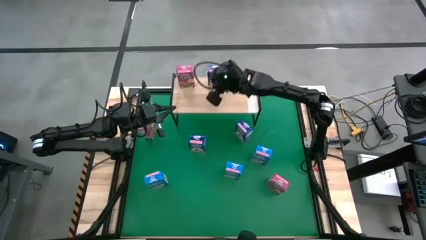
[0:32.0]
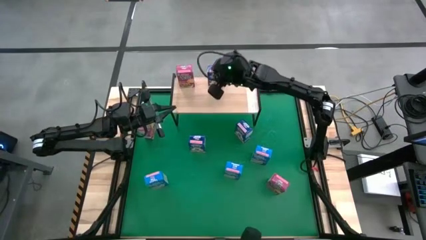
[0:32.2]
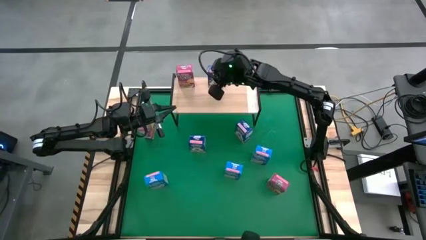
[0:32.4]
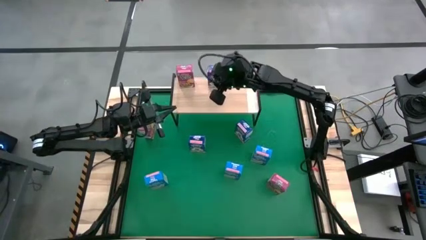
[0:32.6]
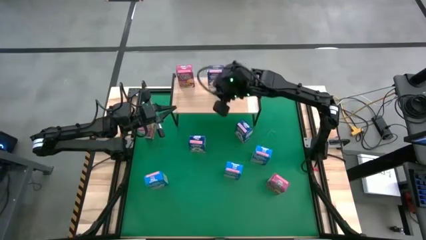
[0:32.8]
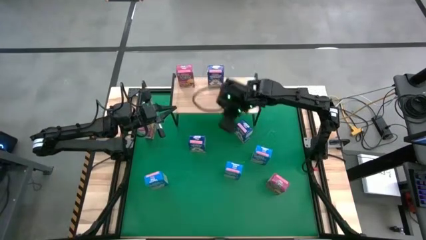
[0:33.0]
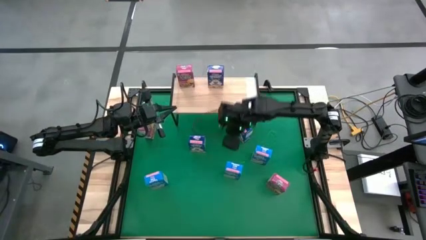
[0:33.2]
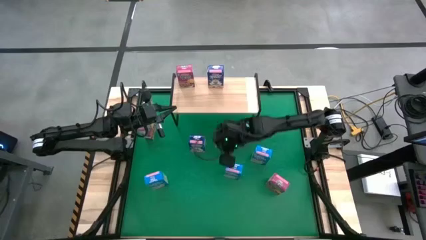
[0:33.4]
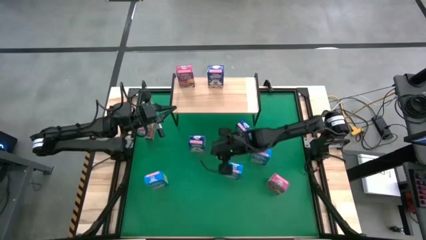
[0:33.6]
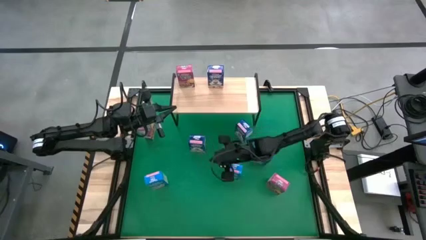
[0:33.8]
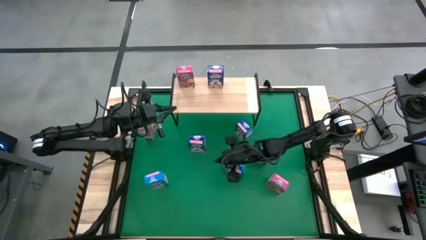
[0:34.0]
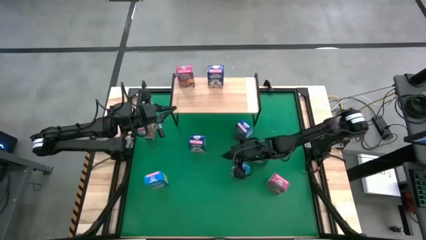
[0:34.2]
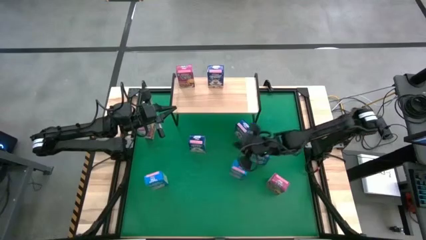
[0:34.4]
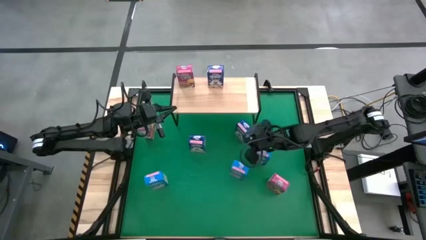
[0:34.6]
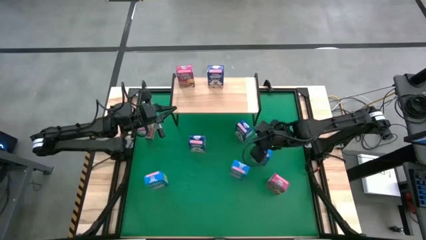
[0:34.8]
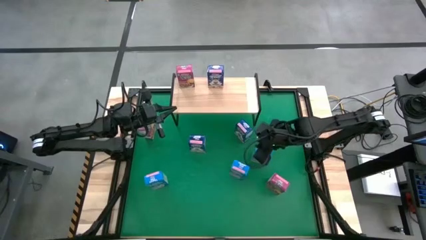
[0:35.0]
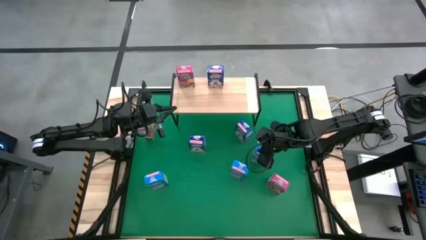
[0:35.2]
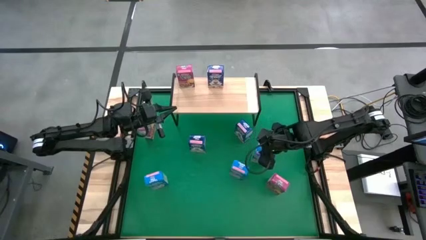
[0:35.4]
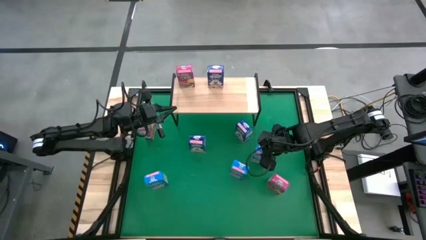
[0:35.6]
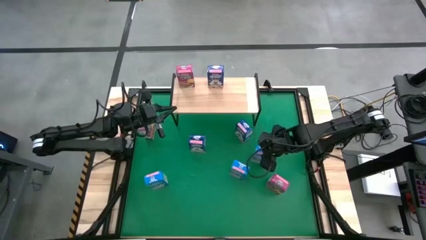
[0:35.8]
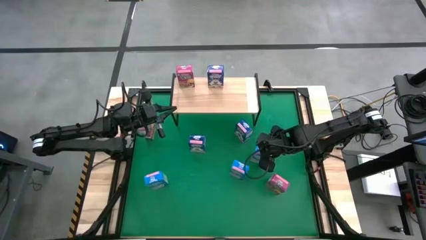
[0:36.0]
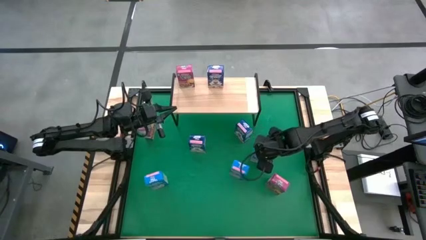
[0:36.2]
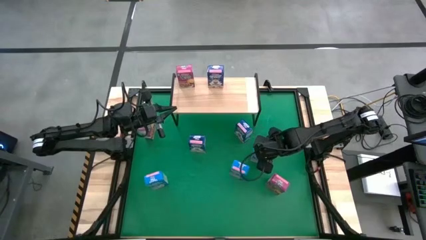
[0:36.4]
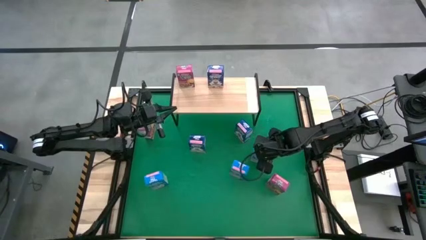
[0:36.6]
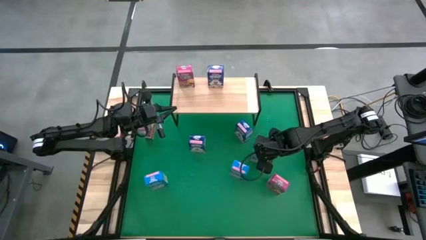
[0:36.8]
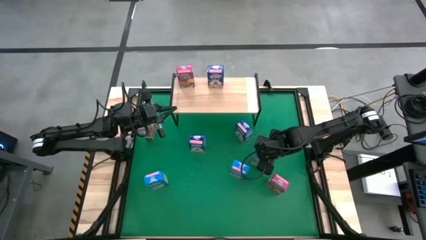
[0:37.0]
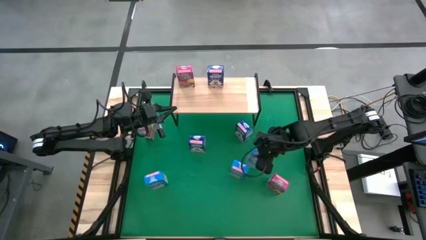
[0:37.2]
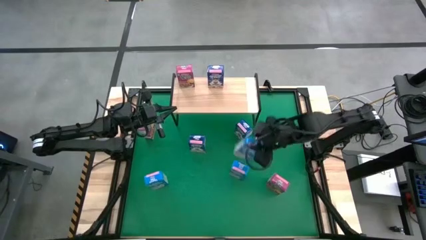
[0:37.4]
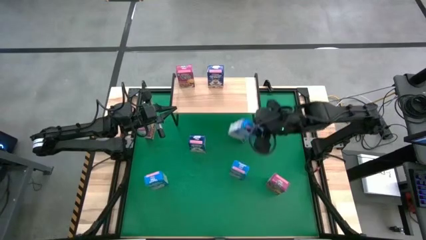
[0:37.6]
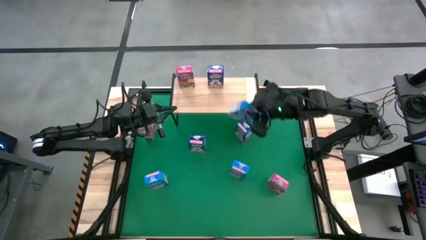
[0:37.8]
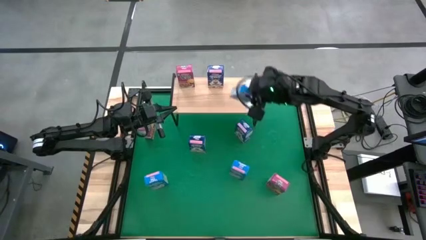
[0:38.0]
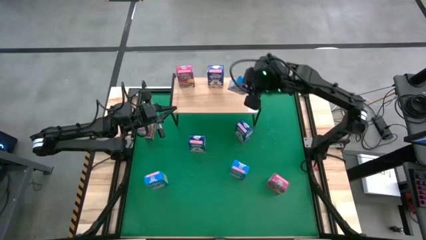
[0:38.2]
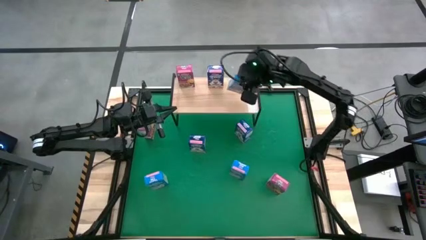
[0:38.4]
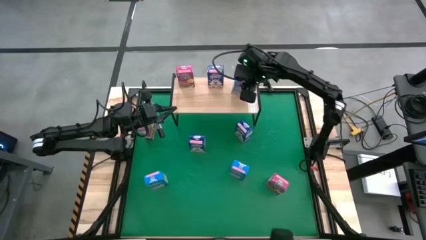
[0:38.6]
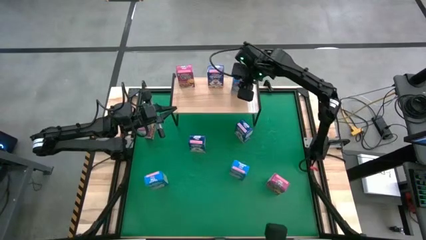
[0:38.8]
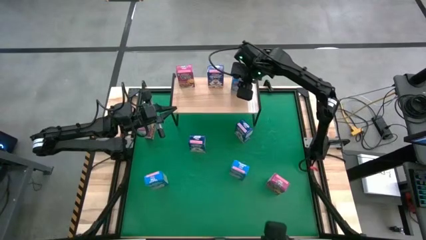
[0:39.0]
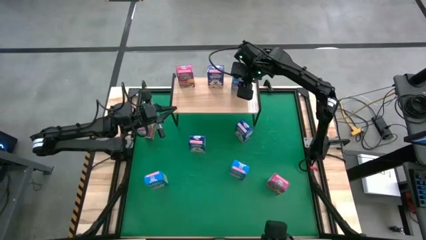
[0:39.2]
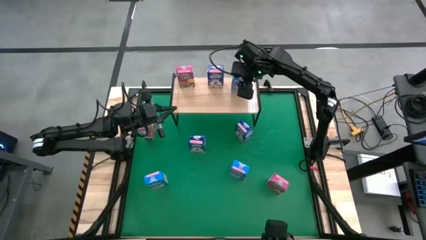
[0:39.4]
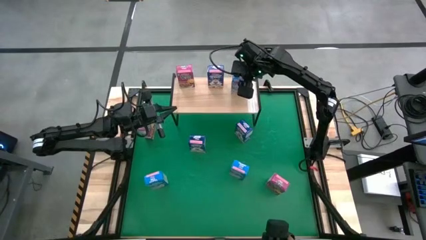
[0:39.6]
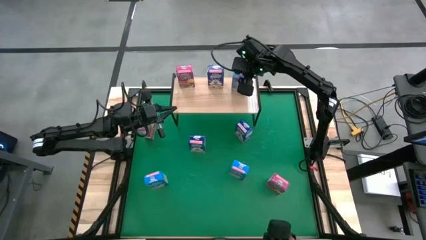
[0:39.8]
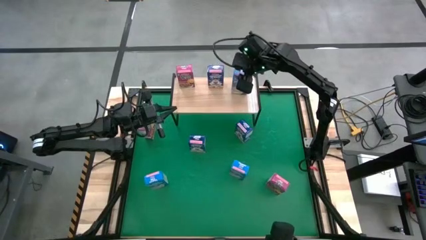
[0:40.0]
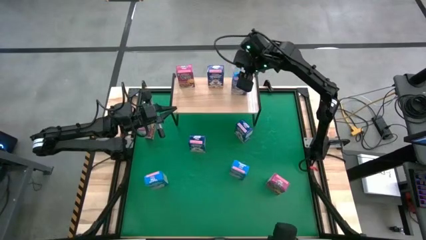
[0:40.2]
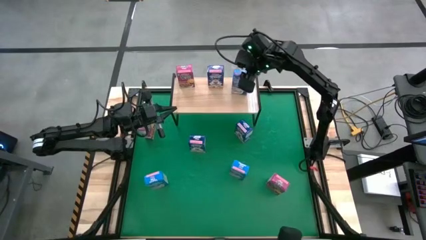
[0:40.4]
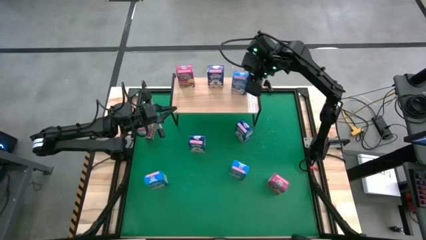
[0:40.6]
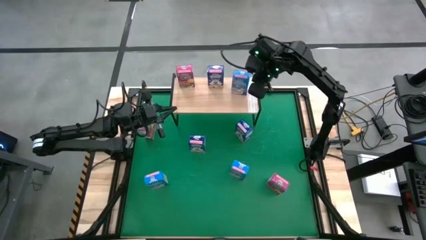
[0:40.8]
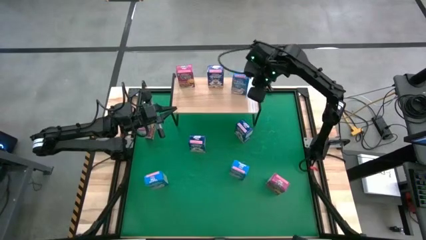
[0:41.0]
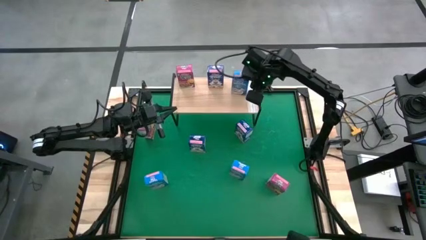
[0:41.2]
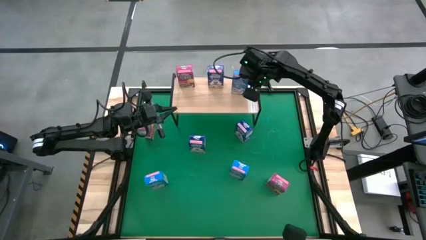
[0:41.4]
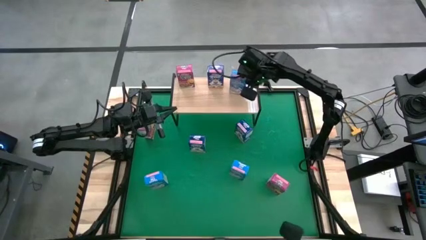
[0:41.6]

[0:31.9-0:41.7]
Task: Stack cereal on shelf
Put the top light blue cereal box on the shelf

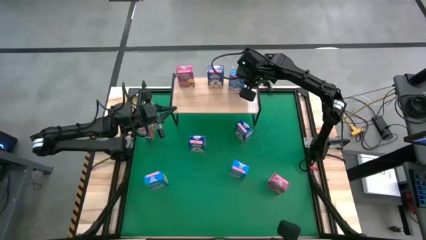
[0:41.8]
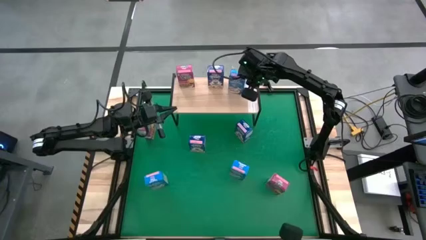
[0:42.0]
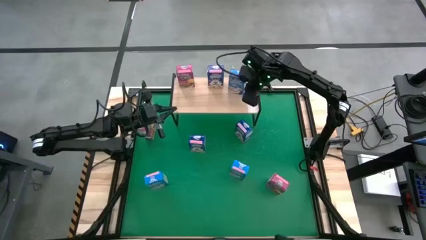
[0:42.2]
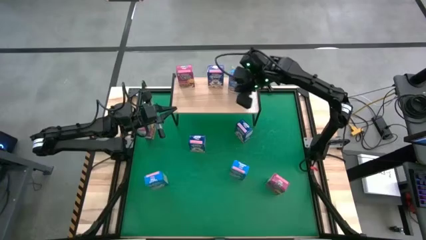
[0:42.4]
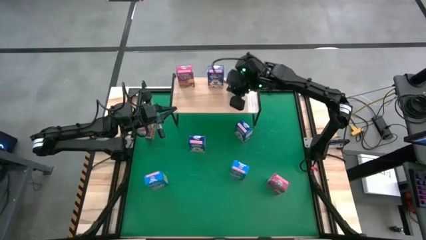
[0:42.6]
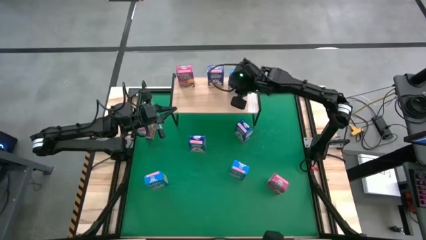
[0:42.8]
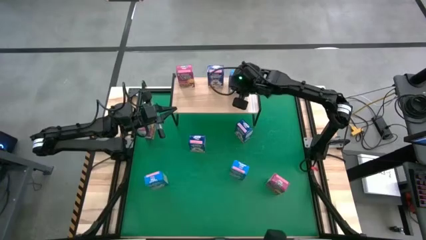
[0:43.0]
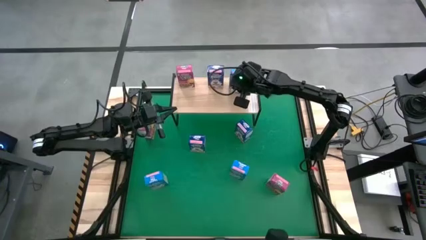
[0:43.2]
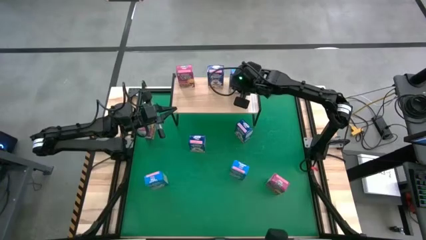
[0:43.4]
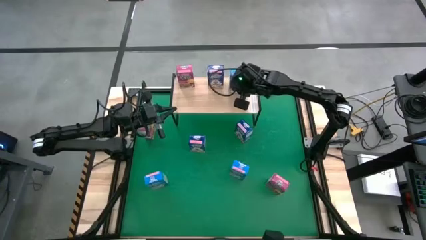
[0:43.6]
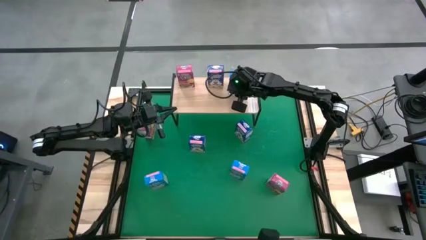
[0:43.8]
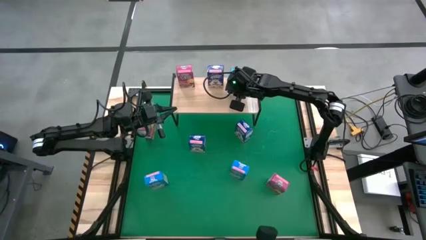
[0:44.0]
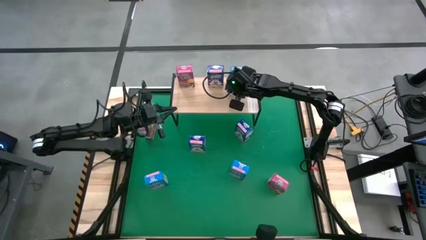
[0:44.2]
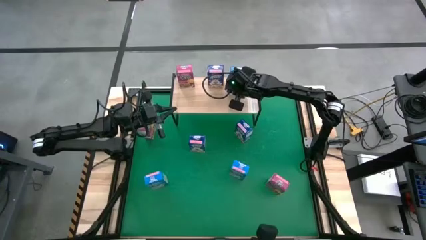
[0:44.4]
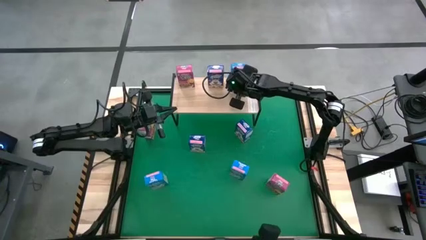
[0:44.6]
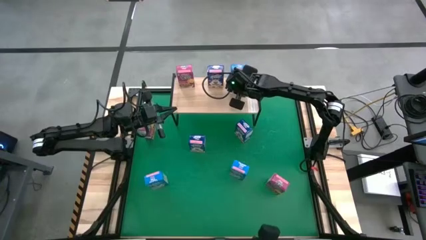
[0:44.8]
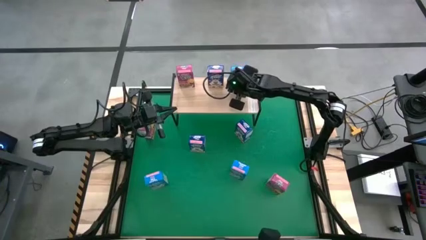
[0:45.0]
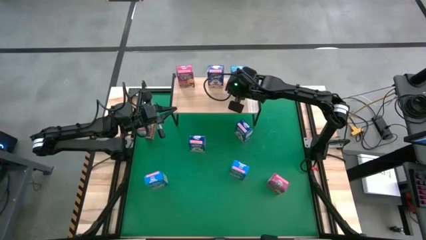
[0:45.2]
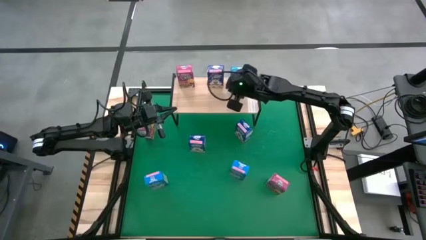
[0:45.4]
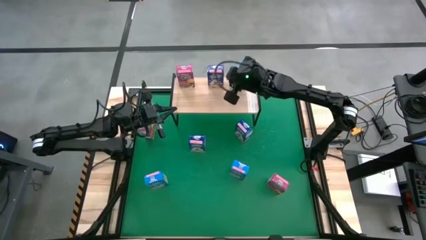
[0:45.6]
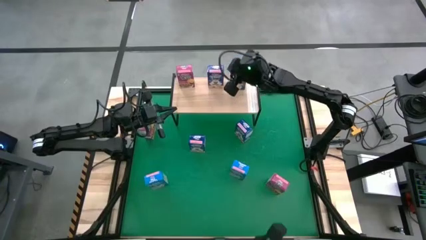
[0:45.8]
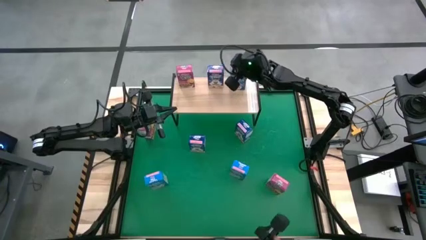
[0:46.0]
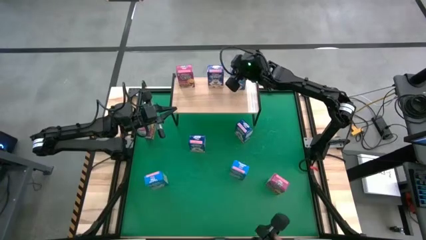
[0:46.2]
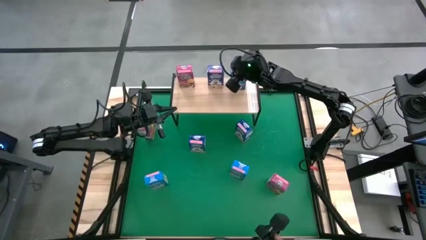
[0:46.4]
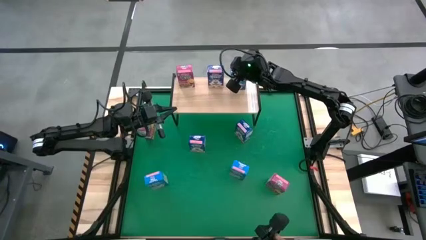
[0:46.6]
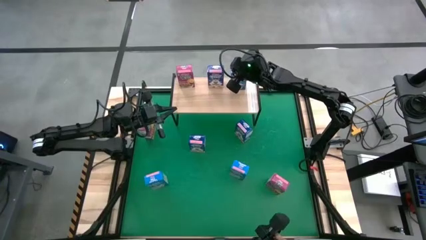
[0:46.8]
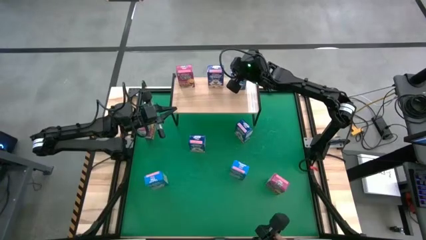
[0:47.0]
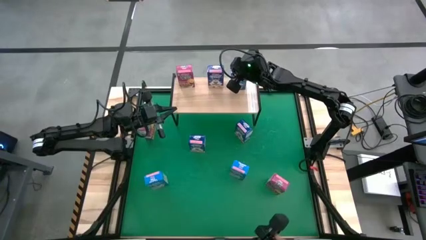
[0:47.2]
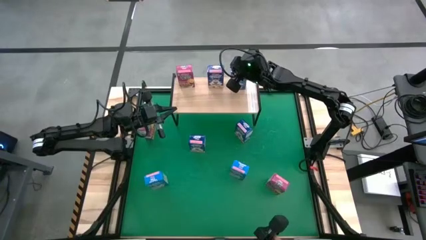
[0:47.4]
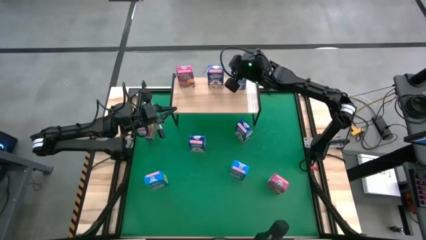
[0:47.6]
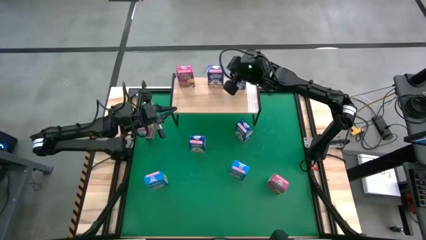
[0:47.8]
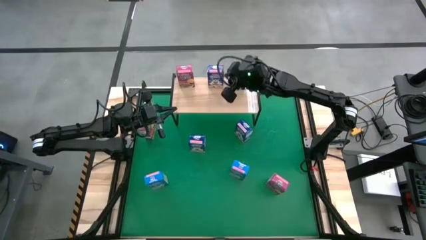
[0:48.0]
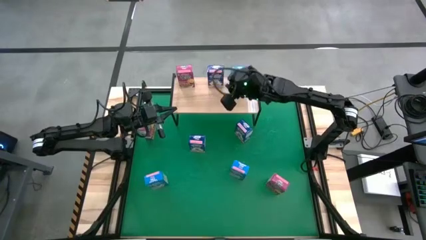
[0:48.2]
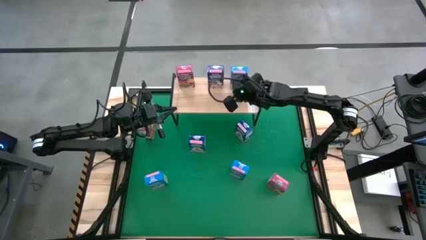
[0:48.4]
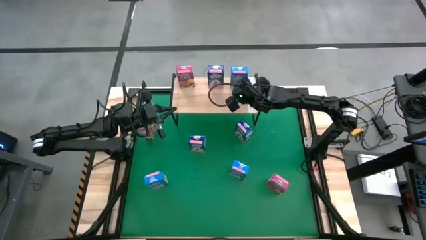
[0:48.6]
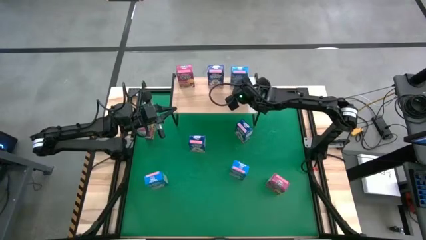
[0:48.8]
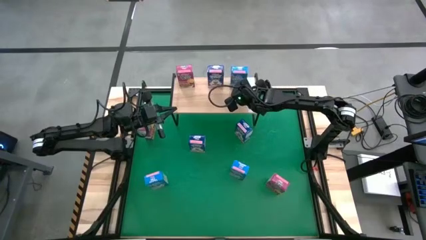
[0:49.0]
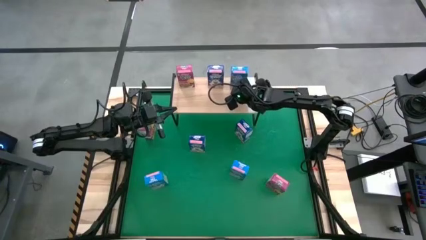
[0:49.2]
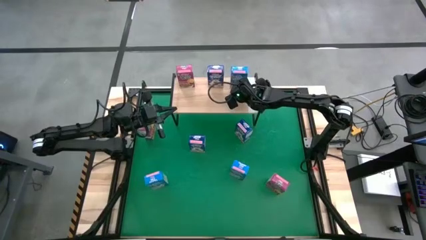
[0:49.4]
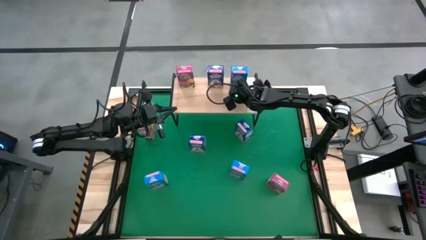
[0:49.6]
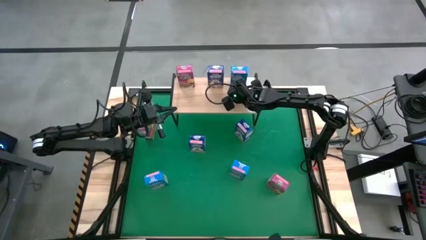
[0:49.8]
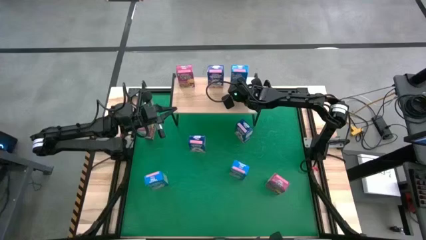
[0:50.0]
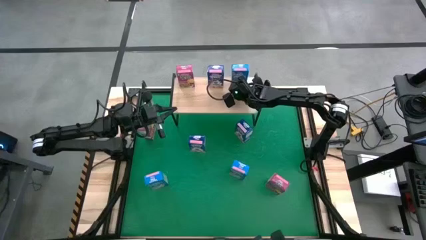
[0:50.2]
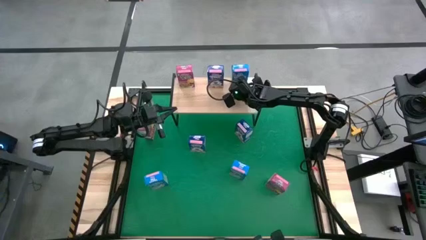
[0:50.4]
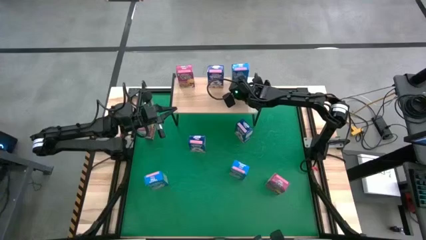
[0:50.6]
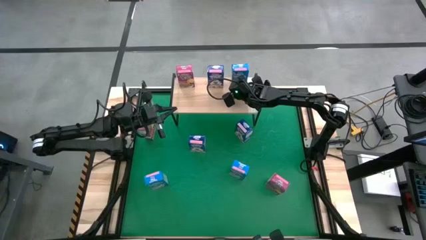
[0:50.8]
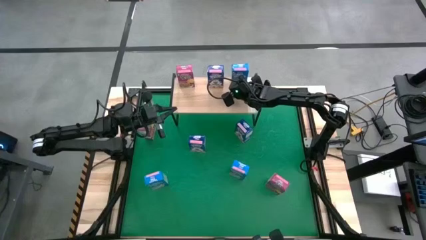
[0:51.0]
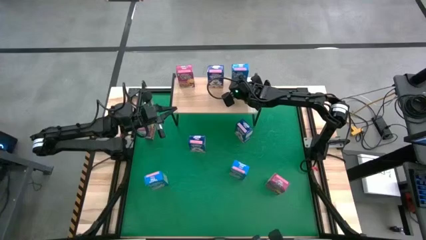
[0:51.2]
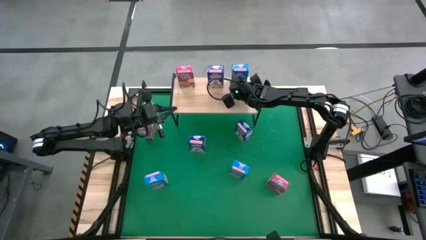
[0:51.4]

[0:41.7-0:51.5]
Put the top light blue cereal box on the shelf
